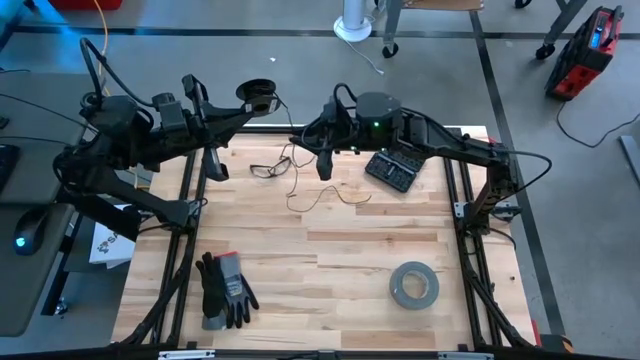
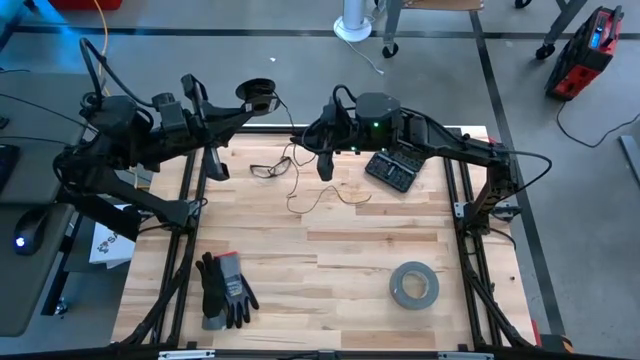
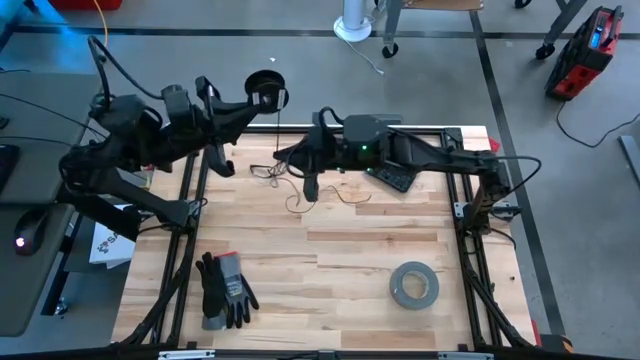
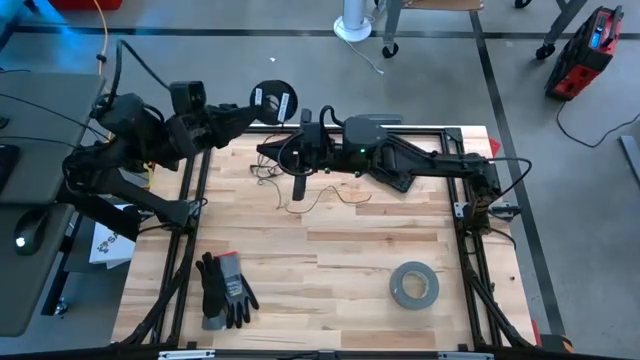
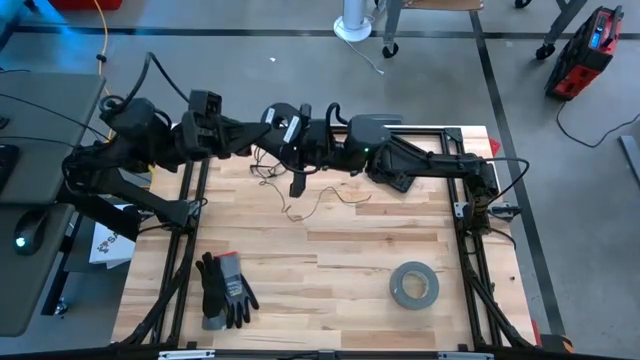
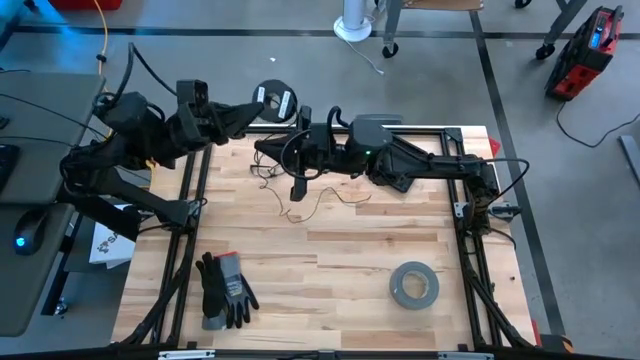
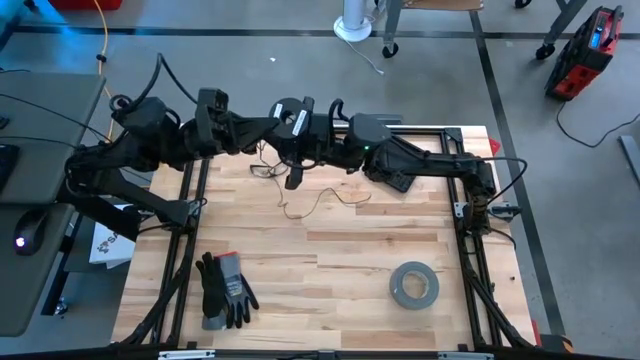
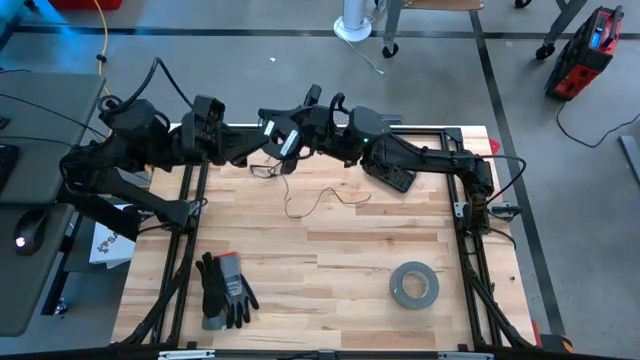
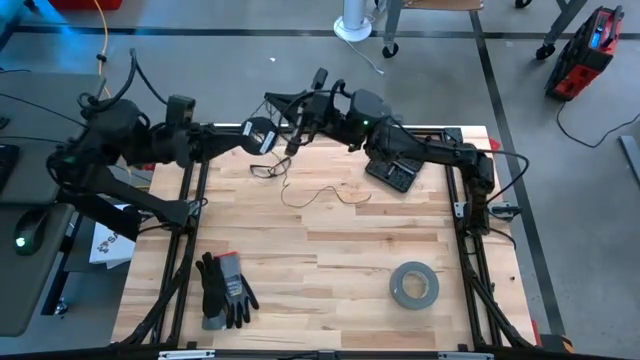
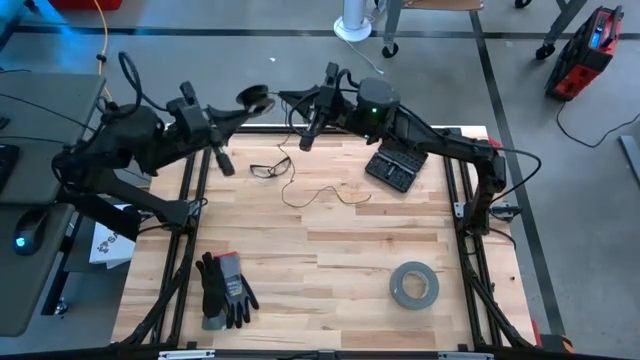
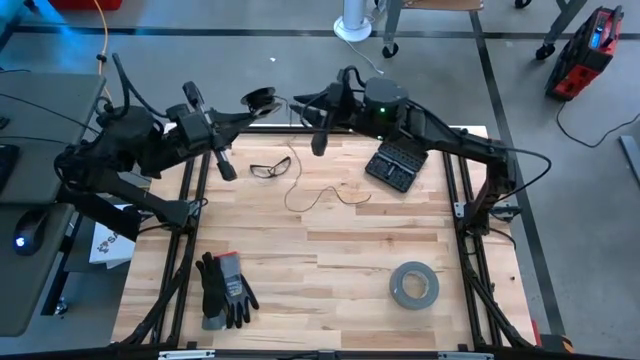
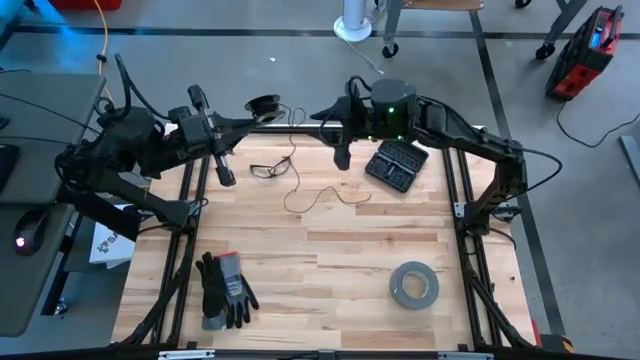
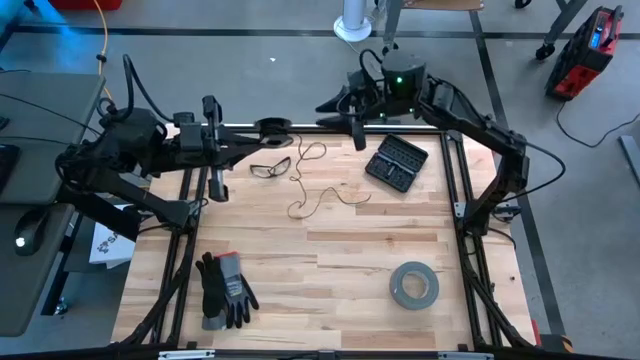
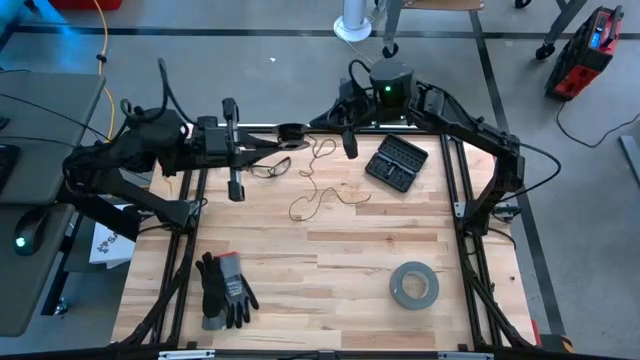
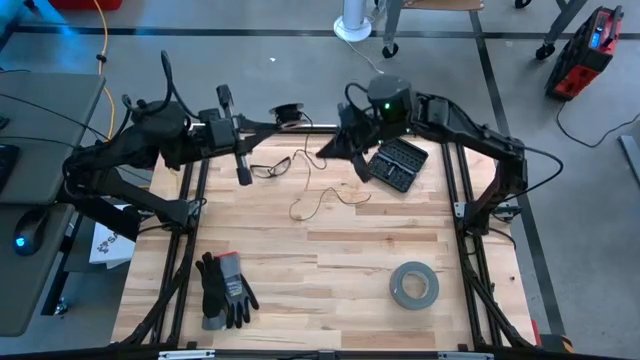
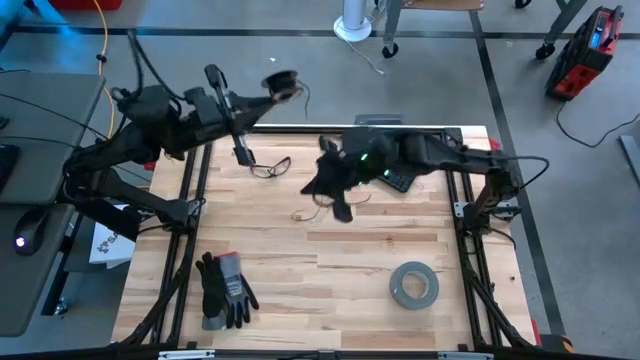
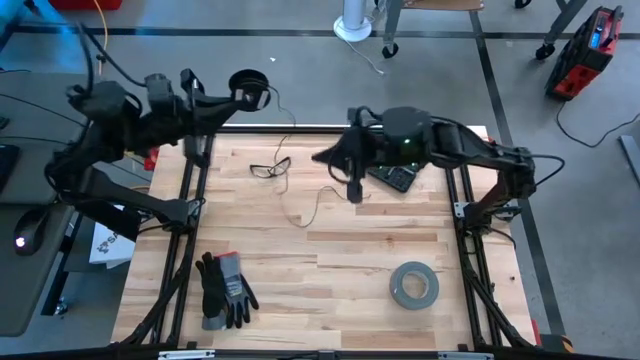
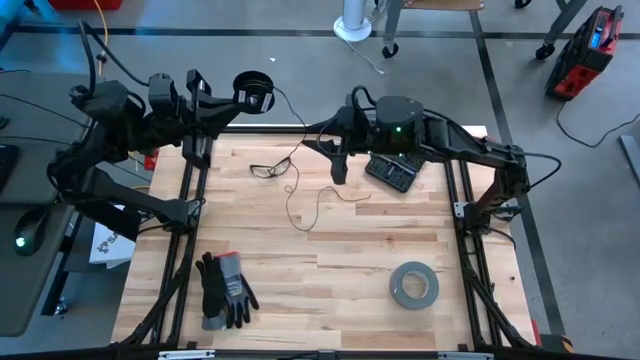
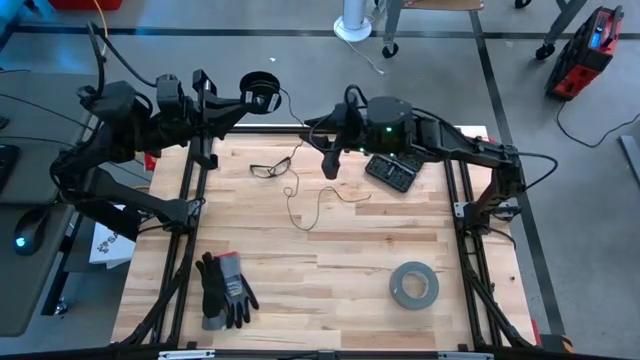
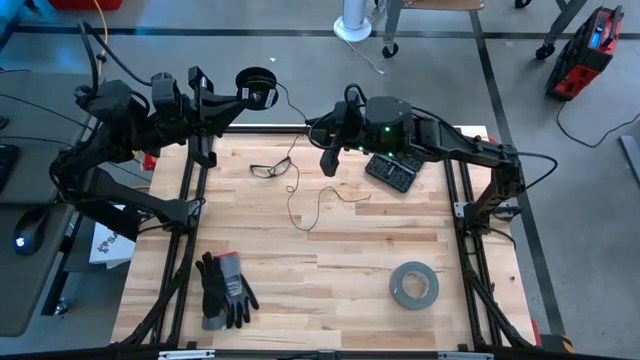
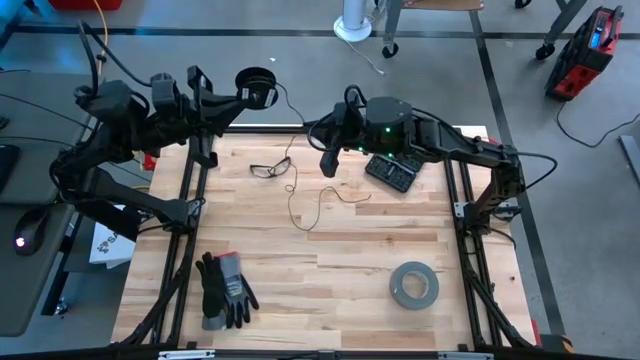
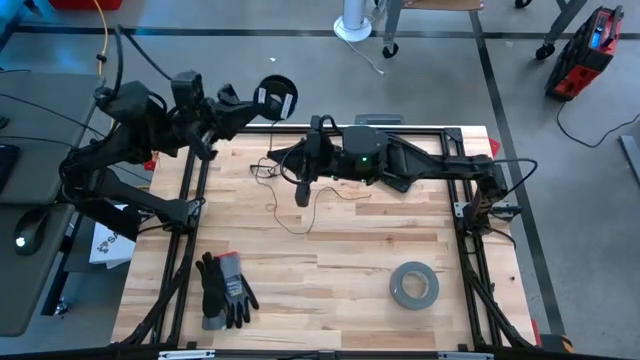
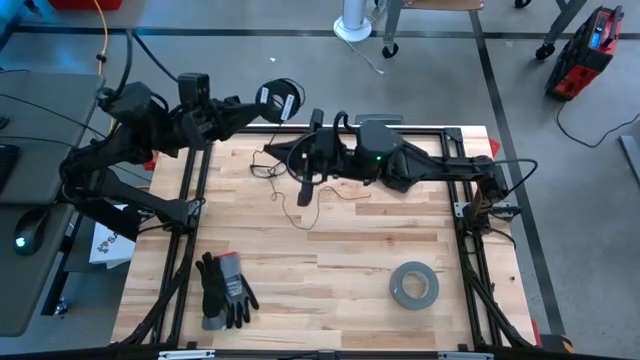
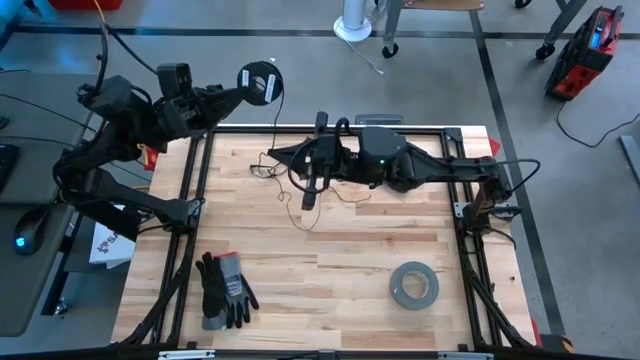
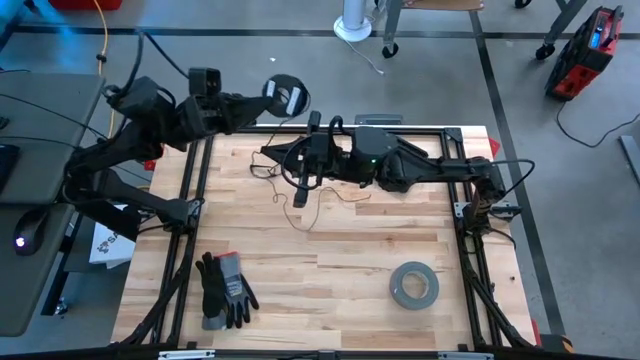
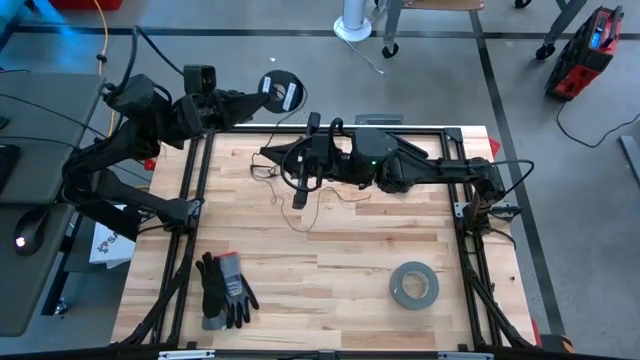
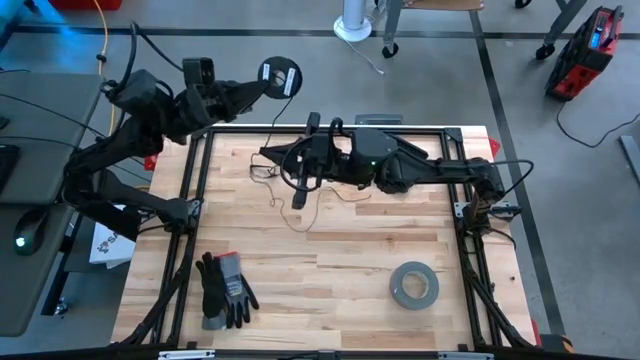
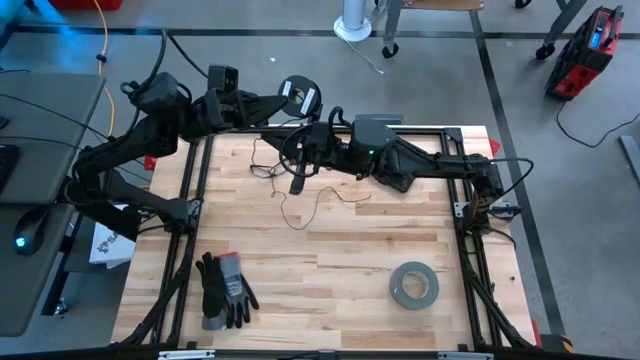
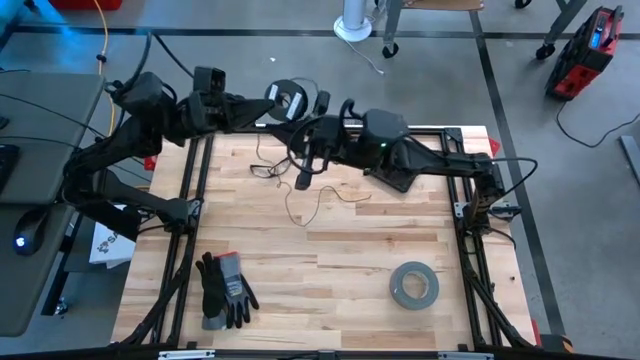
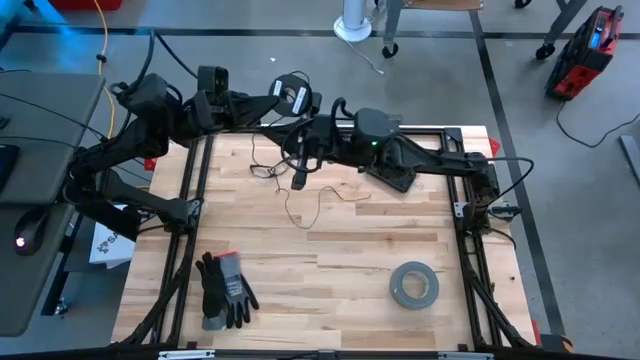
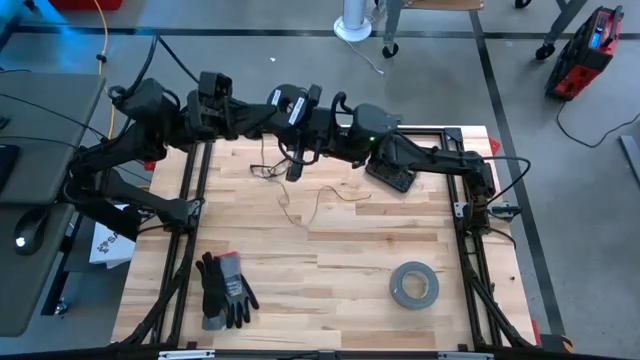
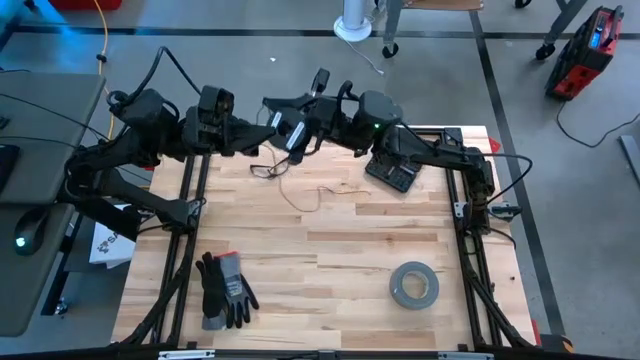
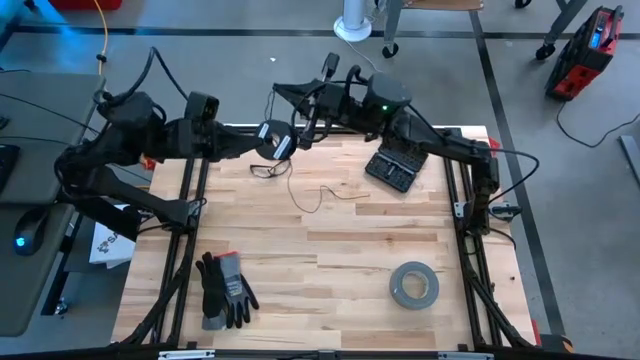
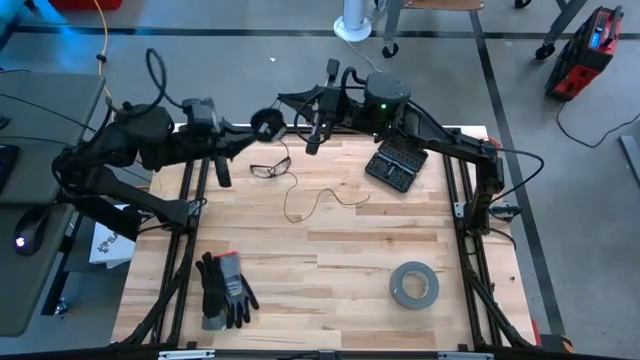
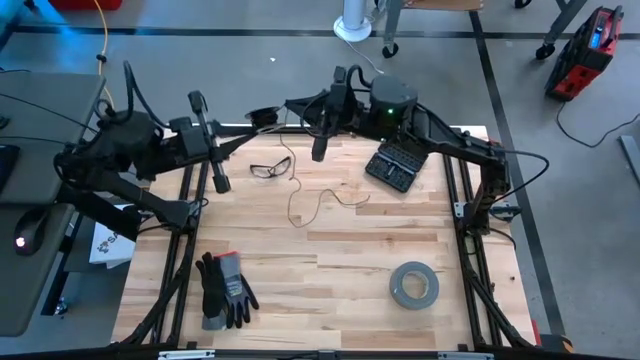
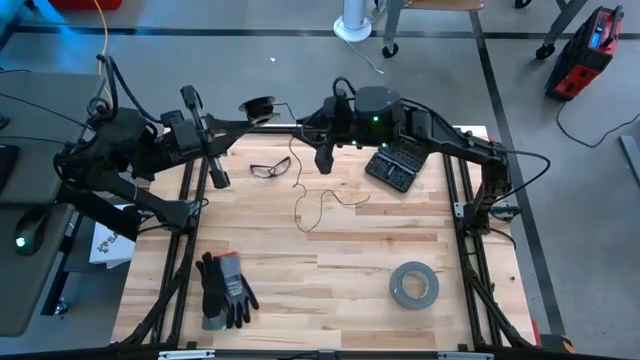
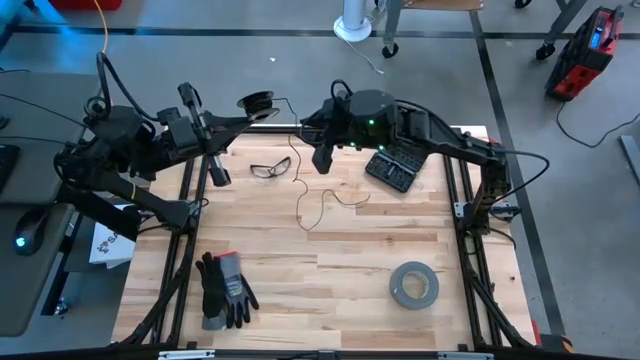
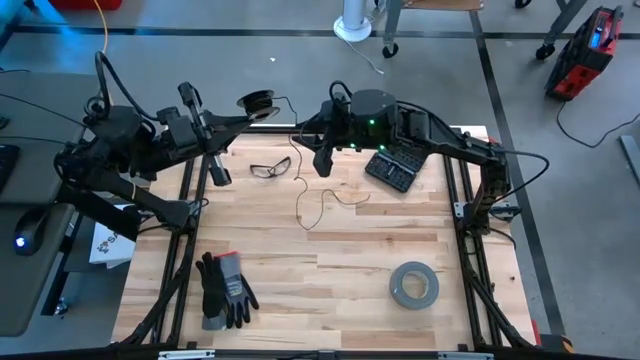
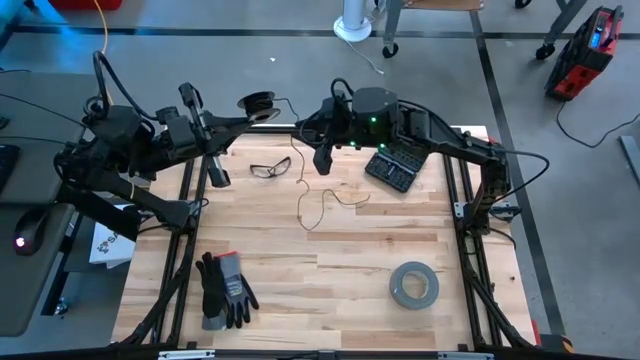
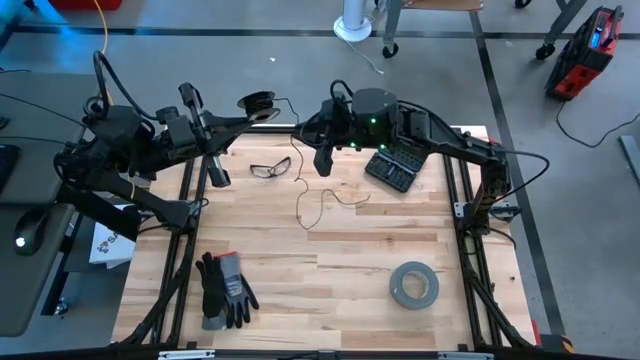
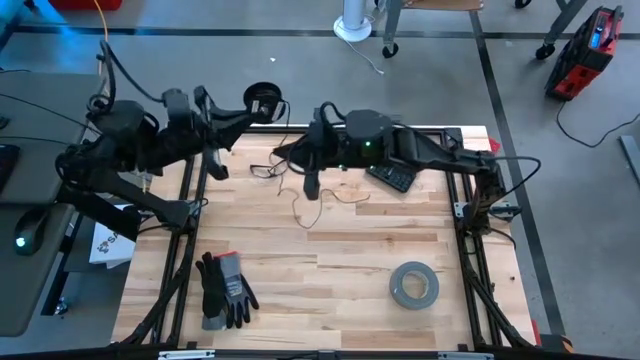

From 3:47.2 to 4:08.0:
Task: Coil cords
Coil the black wire on the black spool
